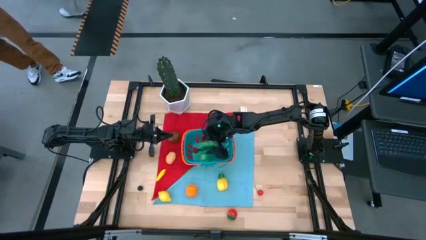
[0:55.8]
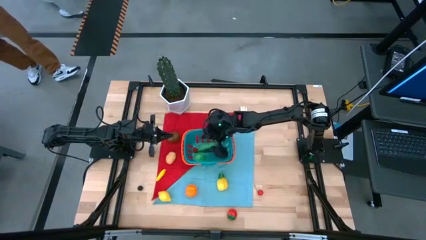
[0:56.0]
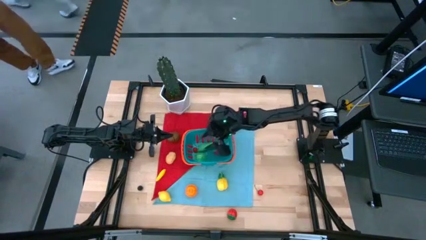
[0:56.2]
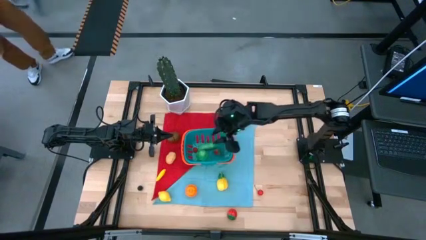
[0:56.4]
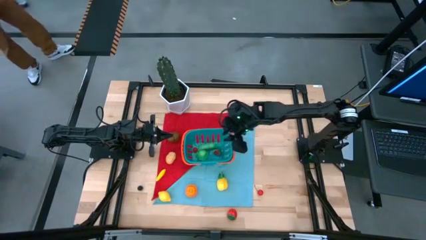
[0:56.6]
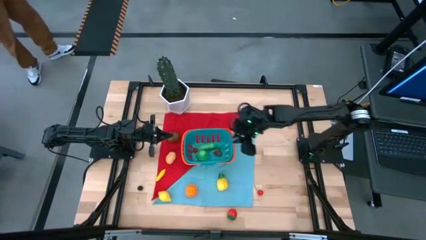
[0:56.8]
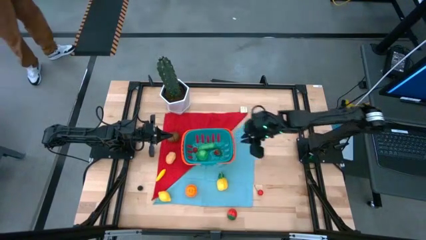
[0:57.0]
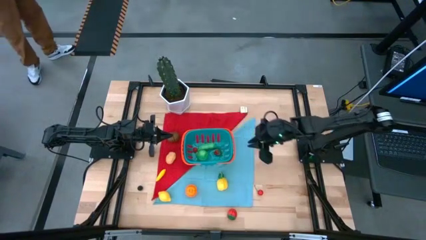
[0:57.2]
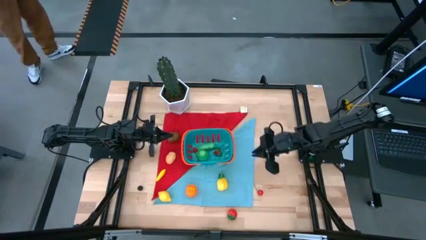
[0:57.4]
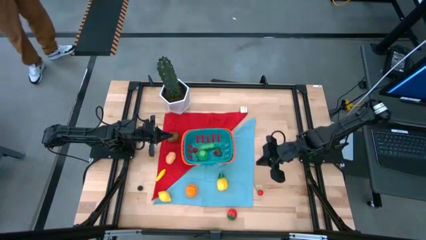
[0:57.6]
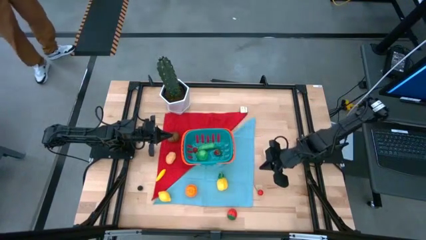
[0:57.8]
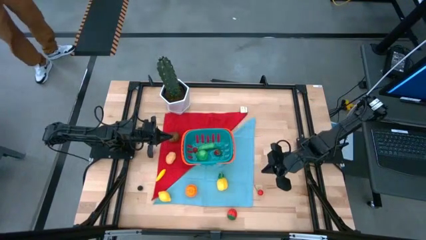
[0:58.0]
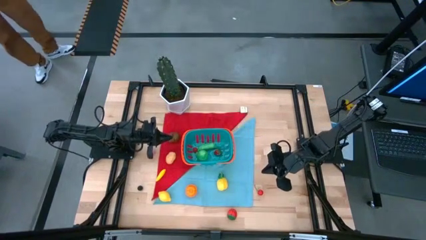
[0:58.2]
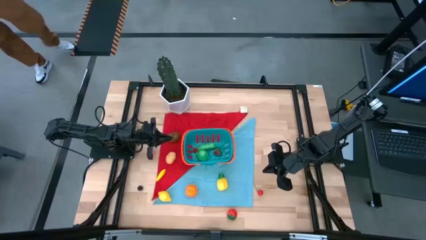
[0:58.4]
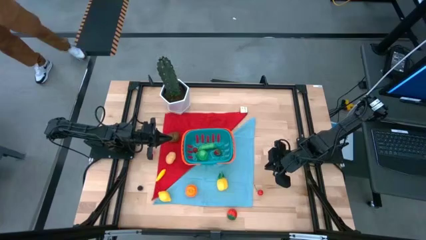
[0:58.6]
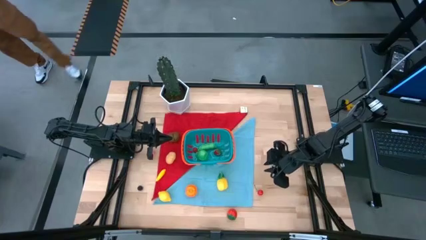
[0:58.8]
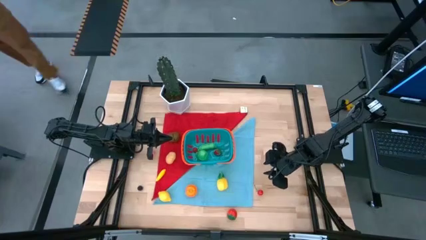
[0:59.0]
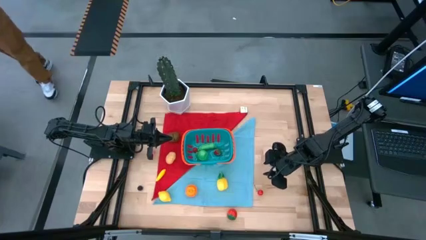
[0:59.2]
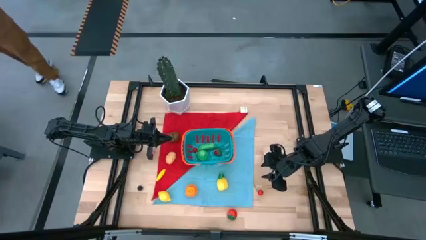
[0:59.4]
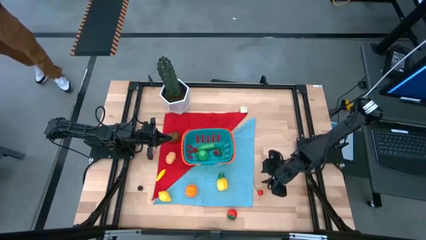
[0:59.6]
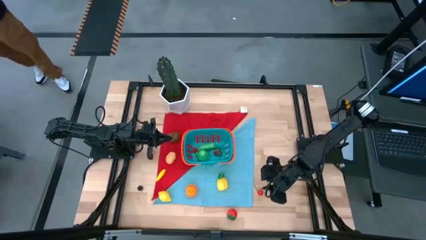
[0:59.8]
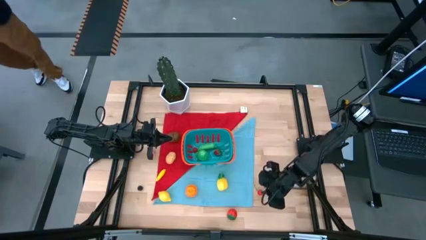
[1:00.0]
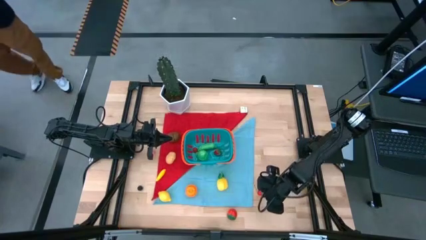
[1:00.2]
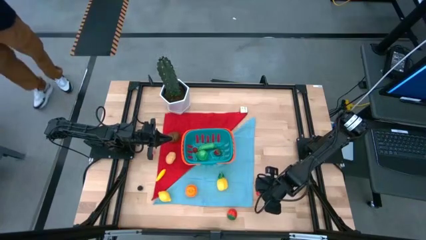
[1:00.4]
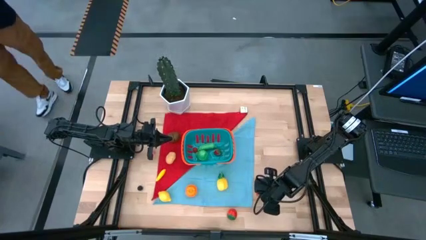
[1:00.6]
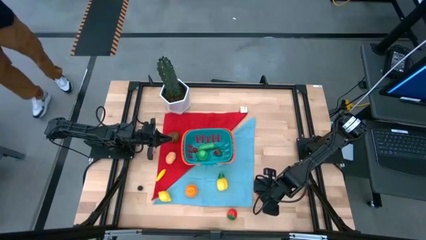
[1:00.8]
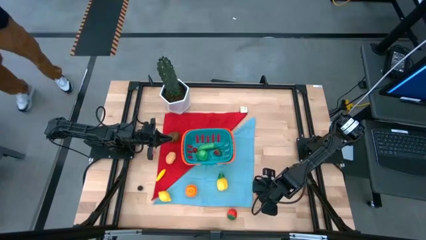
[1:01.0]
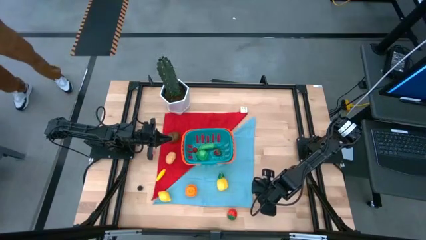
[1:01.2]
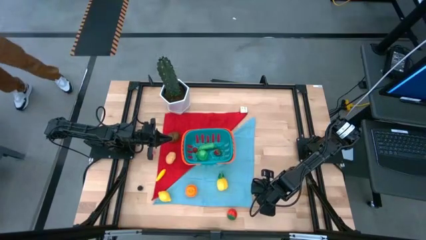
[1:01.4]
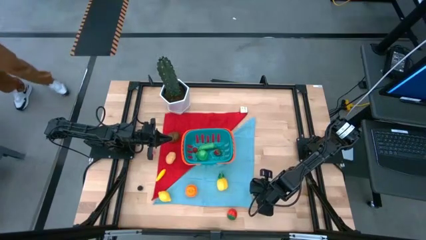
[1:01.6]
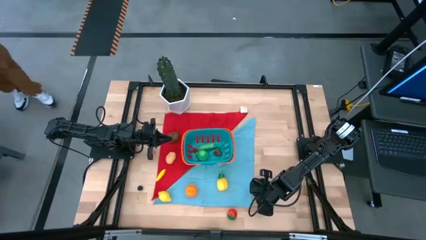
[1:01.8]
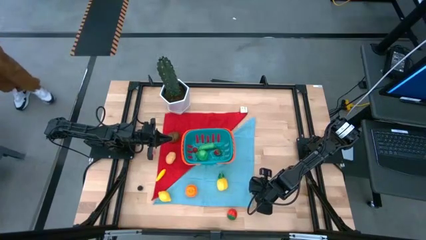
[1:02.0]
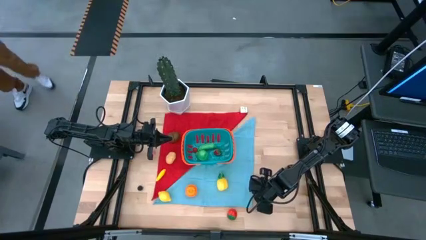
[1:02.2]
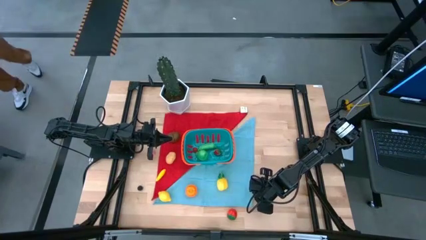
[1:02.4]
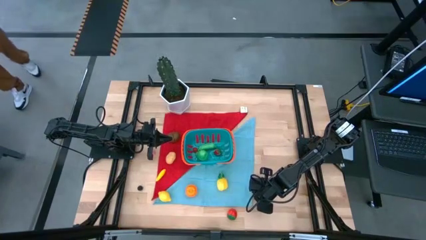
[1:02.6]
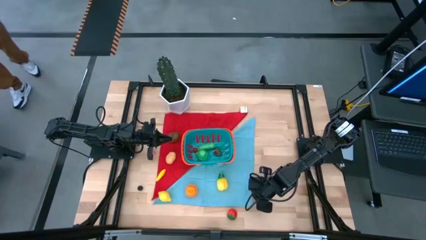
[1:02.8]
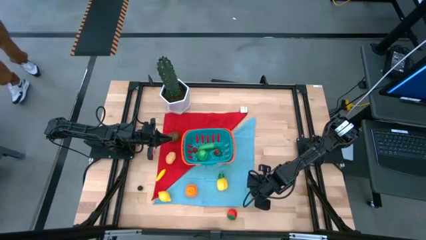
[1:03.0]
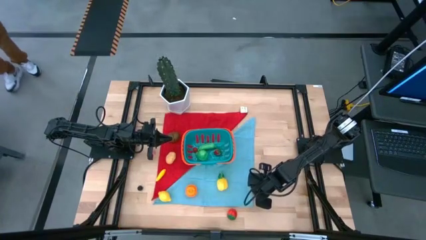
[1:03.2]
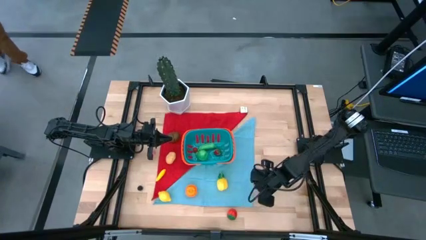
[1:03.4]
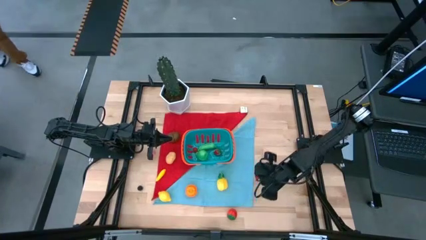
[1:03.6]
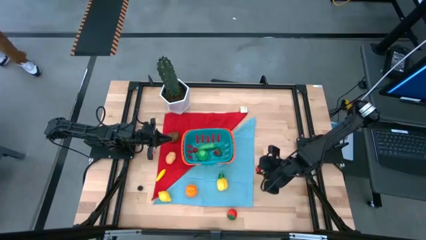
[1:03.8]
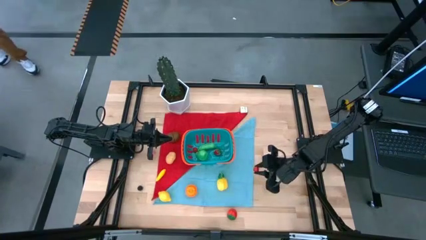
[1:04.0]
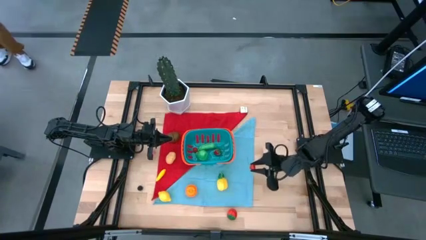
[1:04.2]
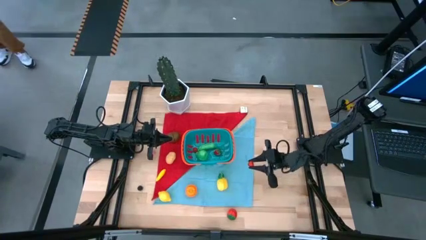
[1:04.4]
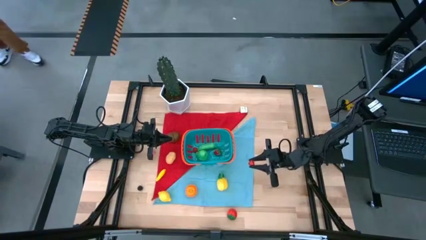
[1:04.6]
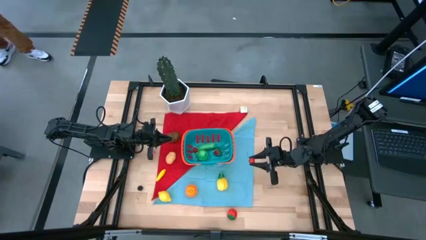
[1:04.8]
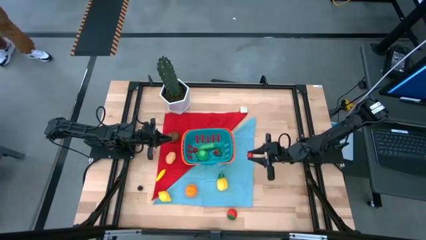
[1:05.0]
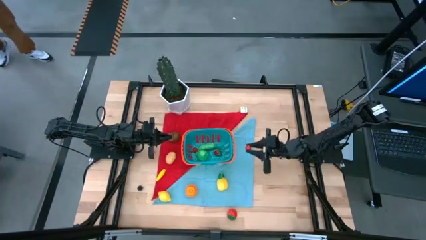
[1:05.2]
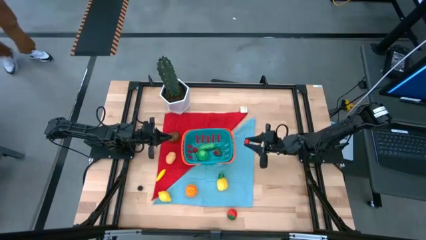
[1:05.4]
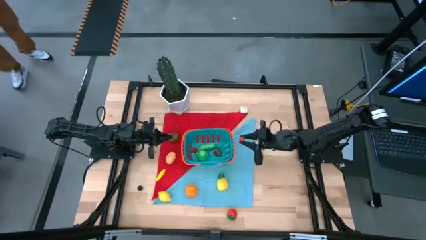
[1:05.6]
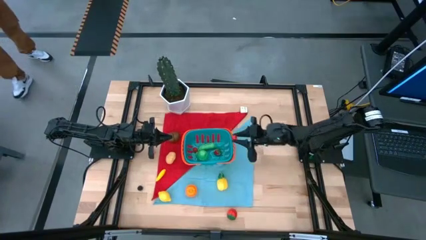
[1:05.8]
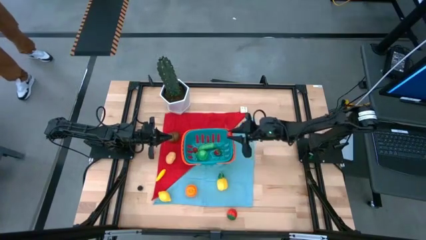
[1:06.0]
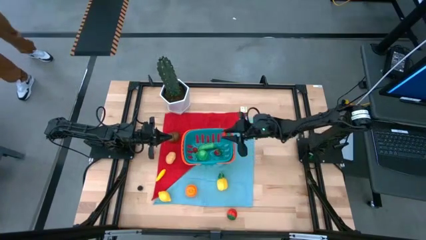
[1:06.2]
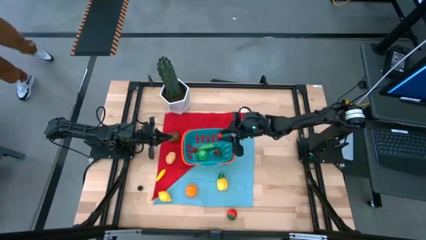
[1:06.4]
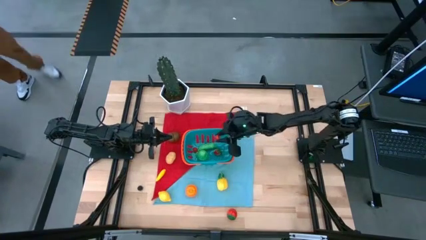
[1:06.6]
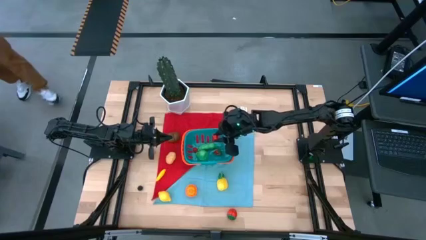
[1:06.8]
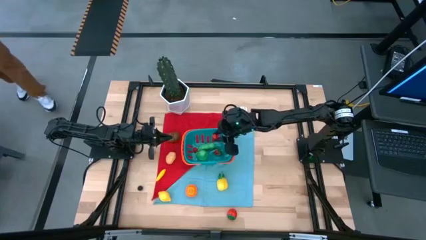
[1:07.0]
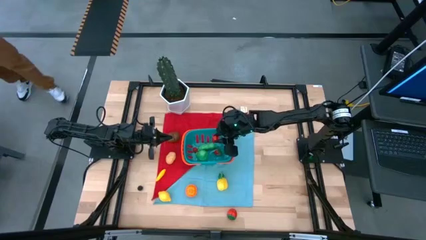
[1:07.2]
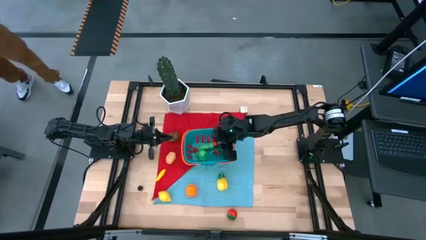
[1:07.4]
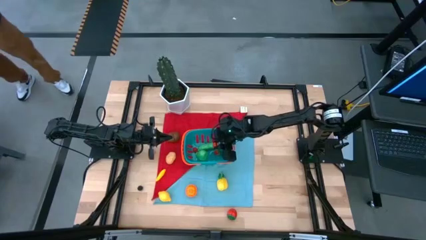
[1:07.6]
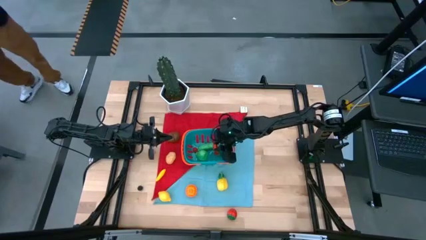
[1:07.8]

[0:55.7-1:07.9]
Task: Build produce basket
Put the red cherry into the blue basket
